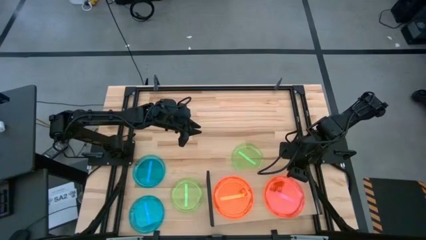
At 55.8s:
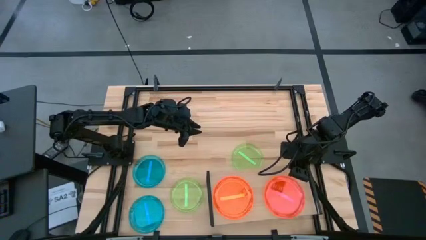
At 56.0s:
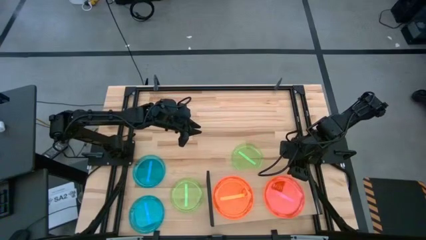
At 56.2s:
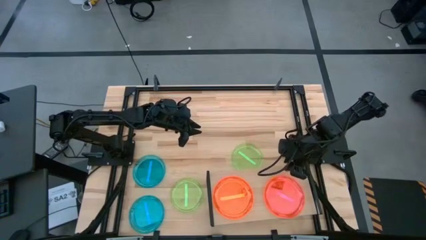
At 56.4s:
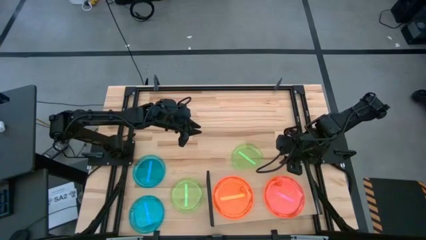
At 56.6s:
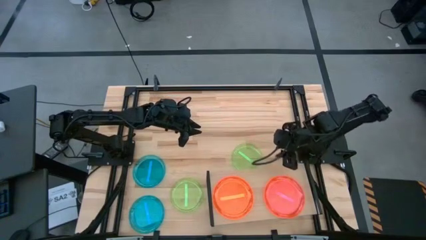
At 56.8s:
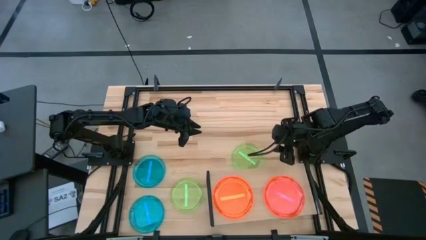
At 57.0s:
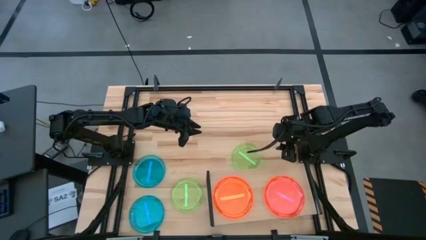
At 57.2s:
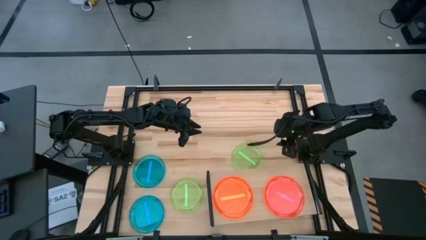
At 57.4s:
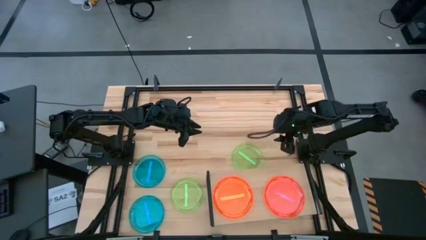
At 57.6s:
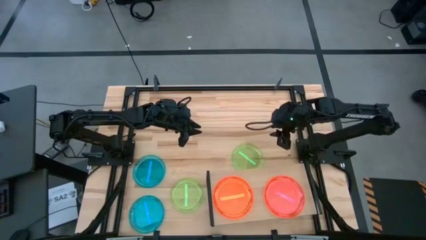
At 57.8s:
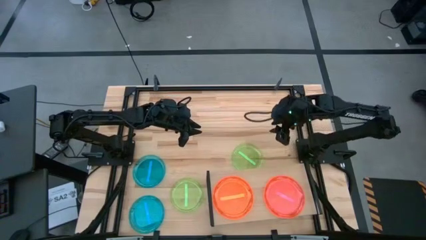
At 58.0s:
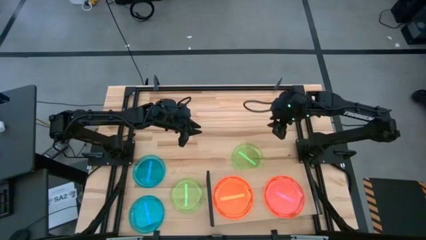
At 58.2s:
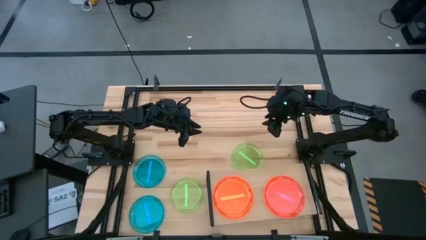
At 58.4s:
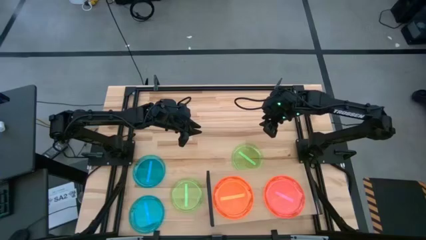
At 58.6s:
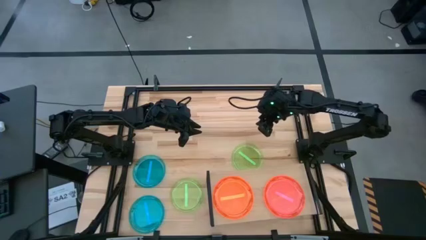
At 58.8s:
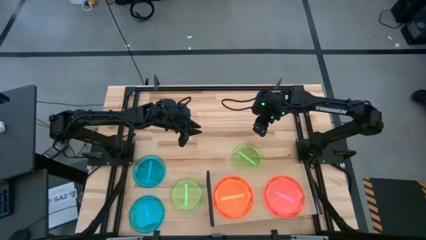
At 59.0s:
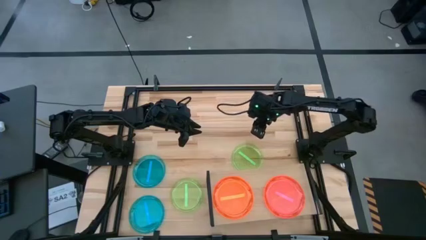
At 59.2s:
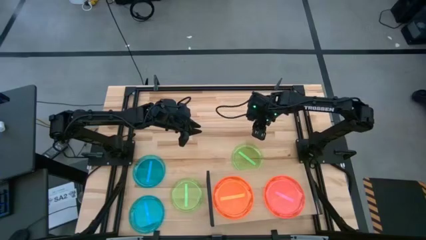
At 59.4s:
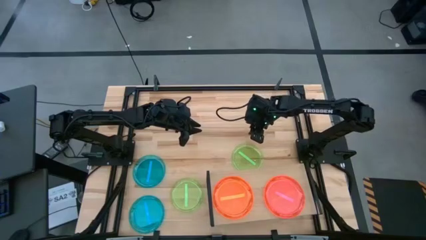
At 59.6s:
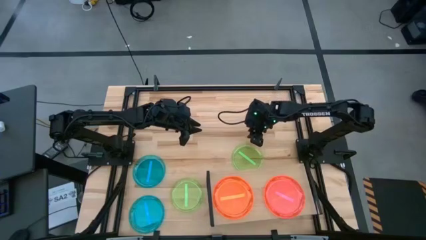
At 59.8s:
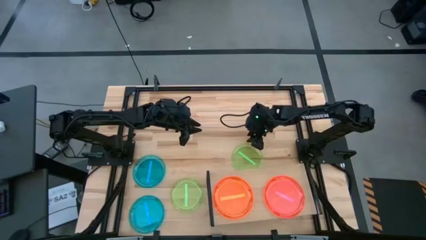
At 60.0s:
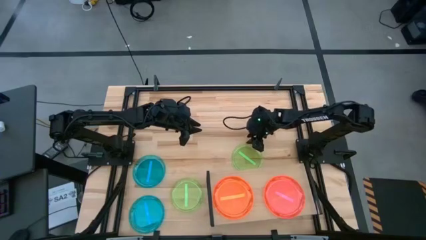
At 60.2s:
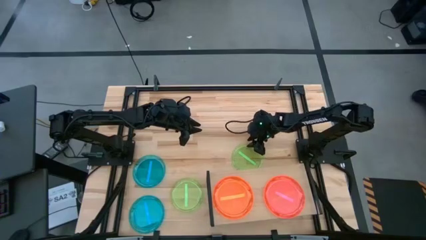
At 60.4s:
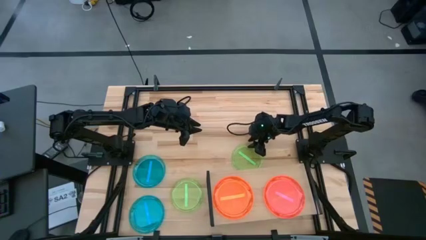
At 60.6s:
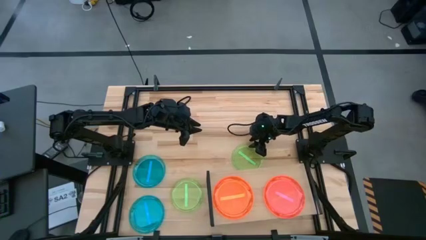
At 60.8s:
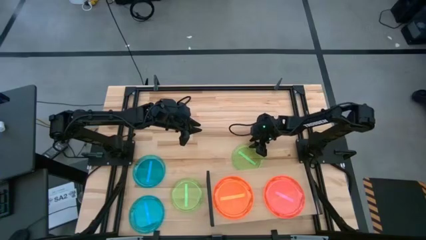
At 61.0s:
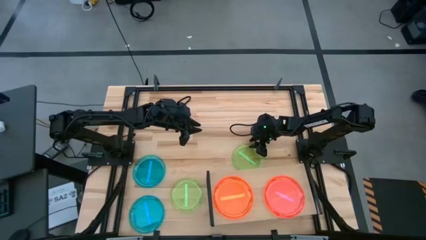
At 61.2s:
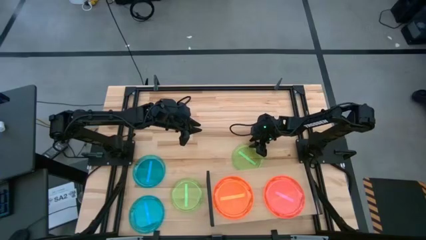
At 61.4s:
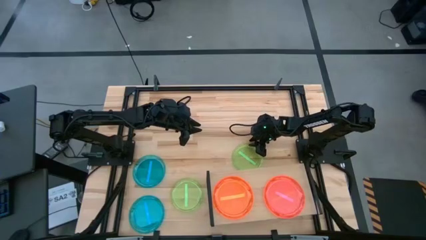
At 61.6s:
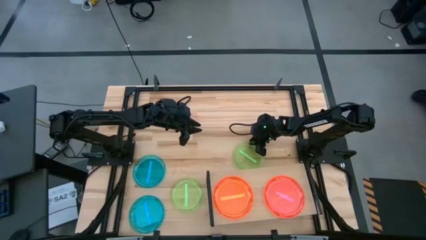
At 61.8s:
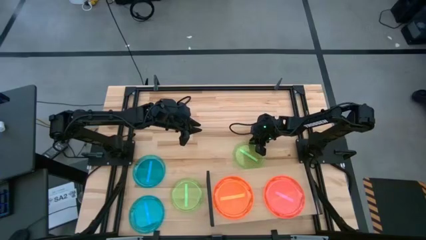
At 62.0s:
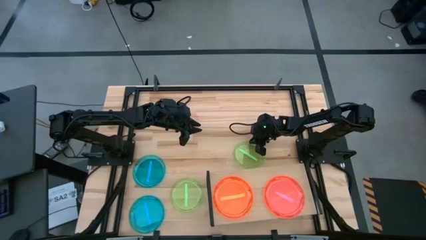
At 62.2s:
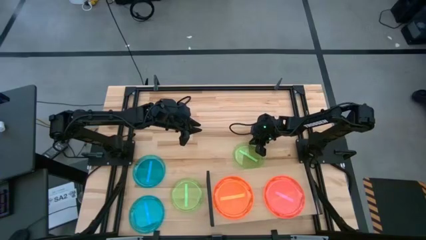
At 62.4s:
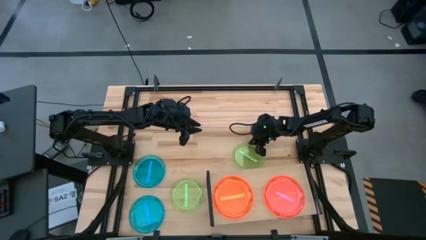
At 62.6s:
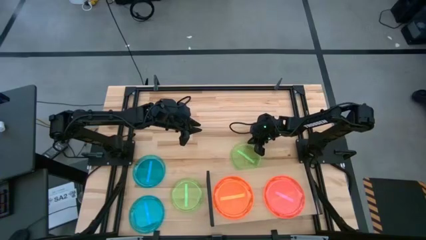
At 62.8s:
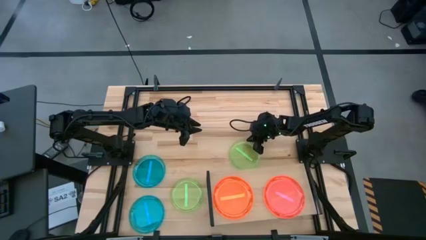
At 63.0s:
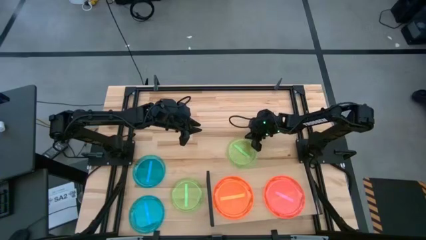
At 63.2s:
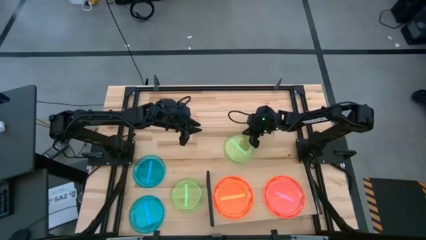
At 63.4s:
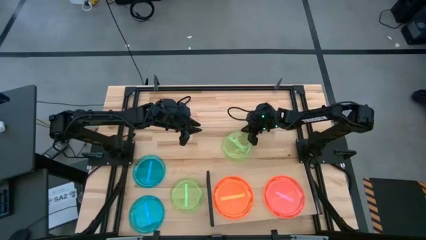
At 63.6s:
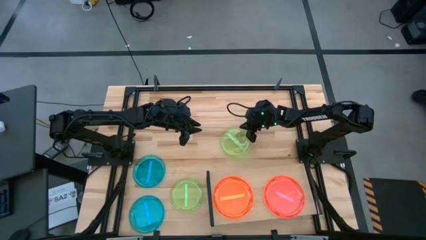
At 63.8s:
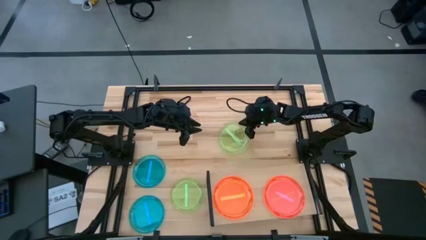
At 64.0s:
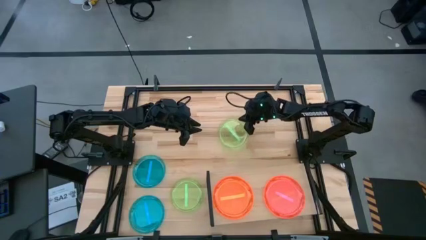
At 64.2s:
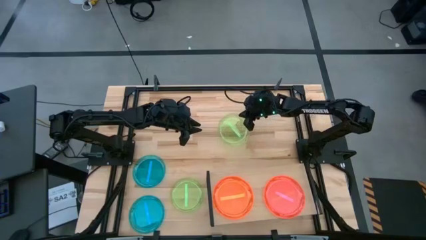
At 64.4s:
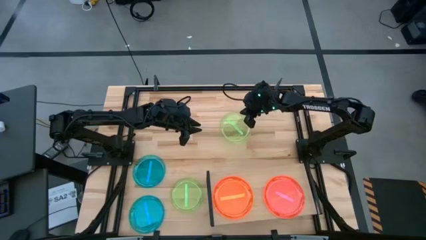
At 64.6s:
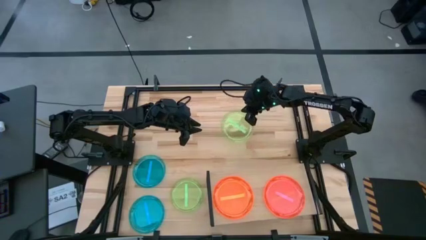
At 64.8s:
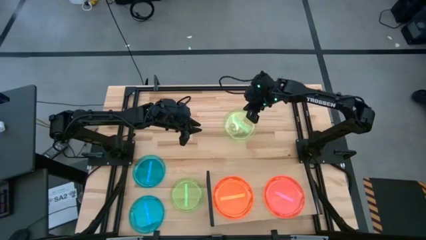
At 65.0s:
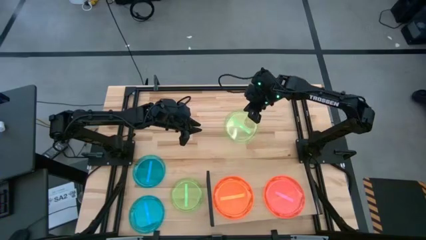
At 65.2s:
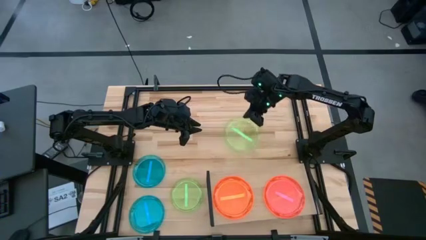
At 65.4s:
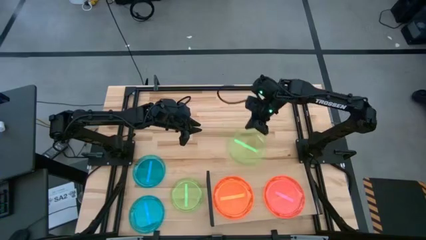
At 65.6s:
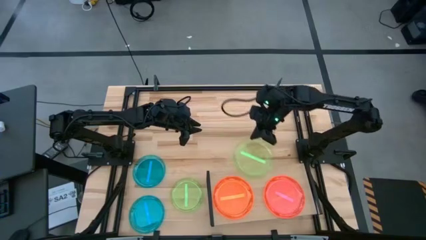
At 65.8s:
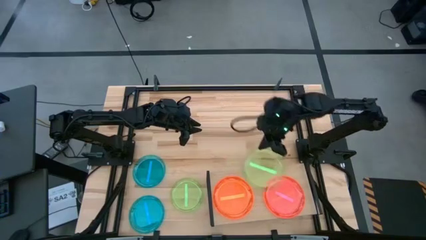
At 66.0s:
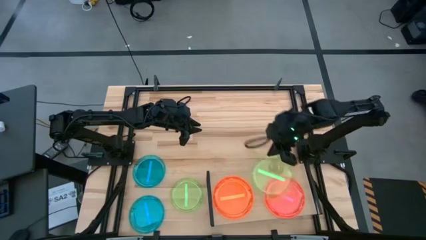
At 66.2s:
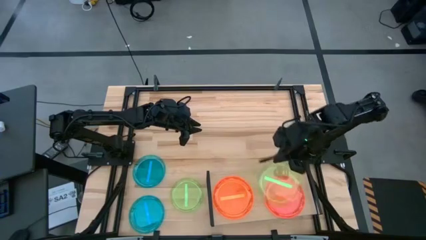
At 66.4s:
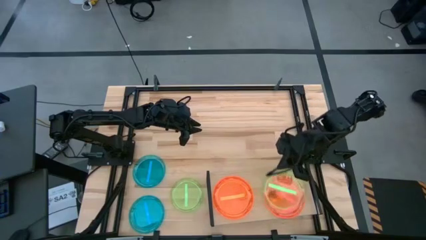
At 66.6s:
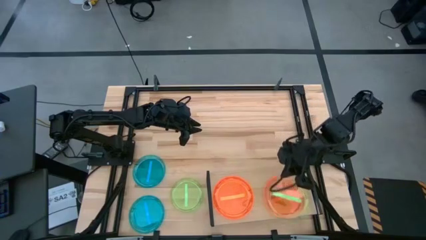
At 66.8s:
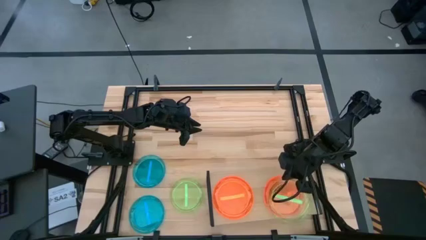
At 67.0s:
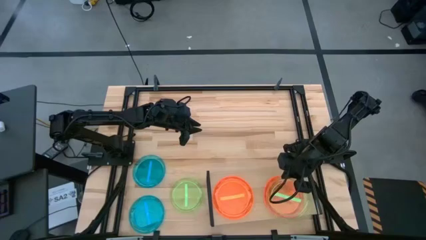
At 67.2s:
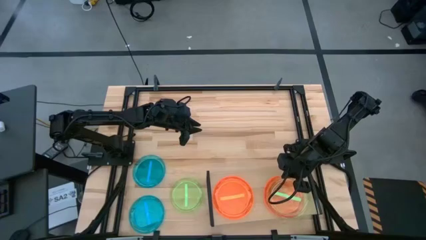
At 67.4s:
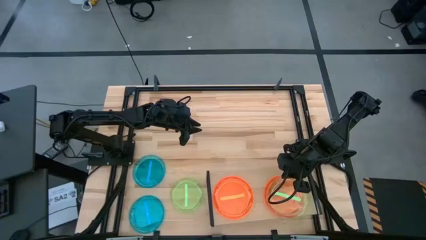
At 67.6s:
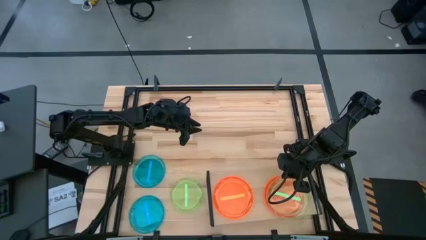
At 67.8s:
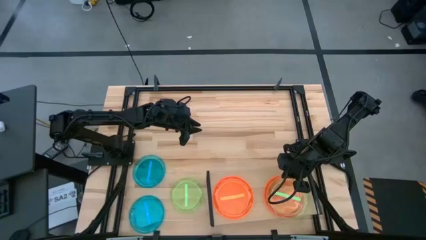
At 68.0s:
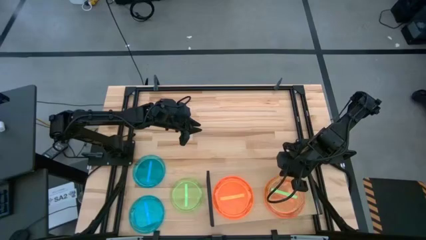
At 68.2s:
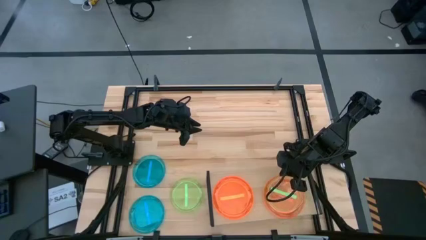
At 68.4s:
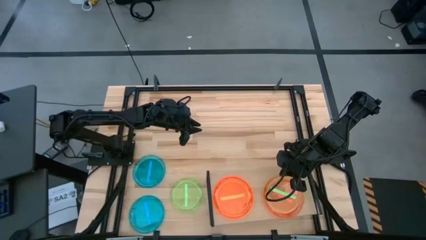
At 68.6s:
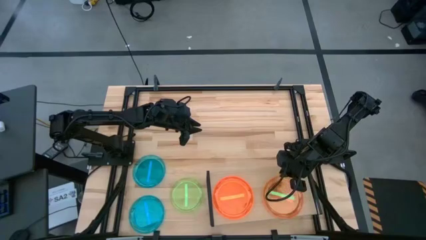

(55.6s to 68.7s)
Task: Place and stack plates onto a shelf
Stack the right green plate on the pink plates on the shelf
